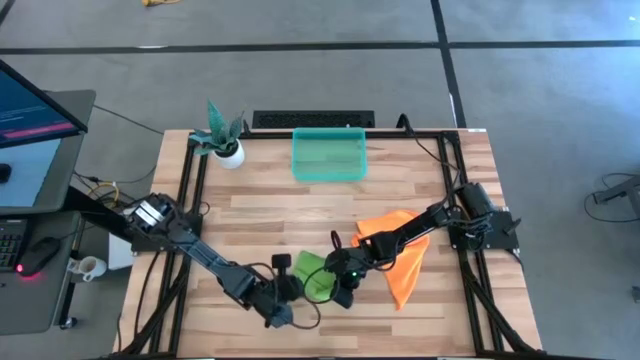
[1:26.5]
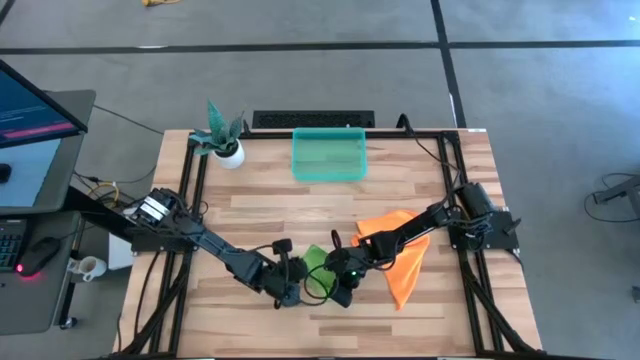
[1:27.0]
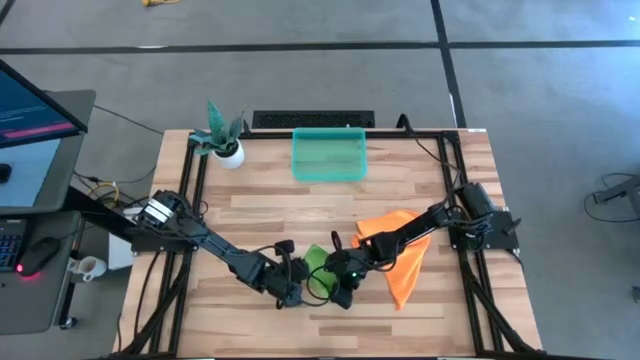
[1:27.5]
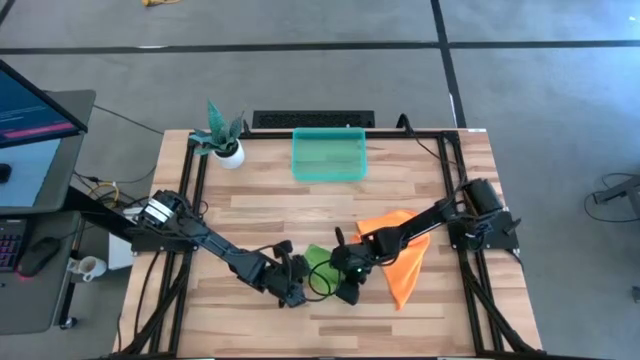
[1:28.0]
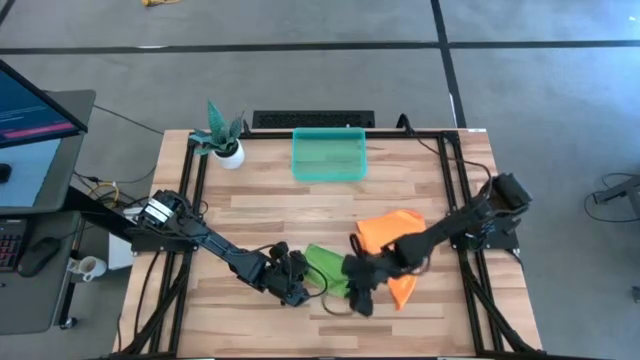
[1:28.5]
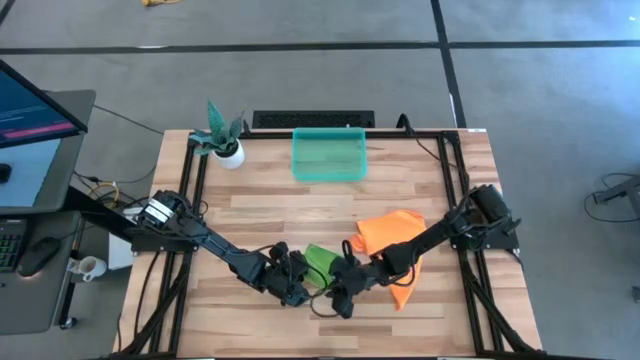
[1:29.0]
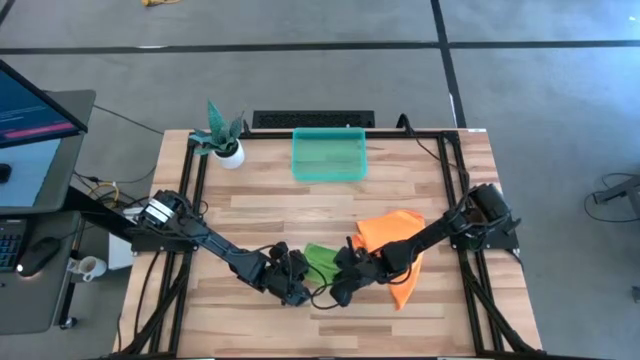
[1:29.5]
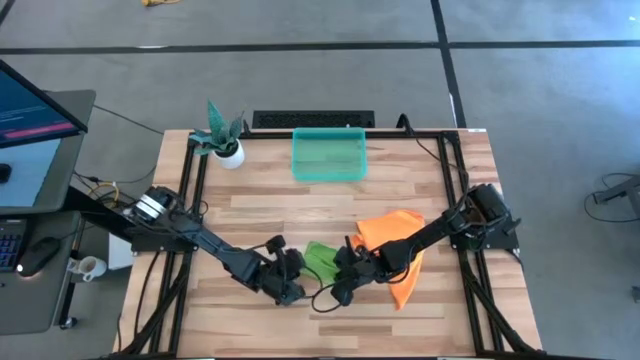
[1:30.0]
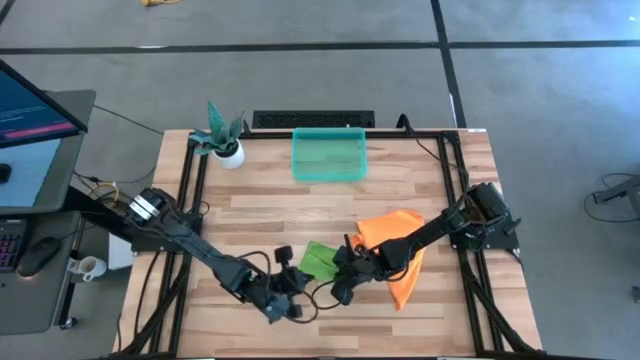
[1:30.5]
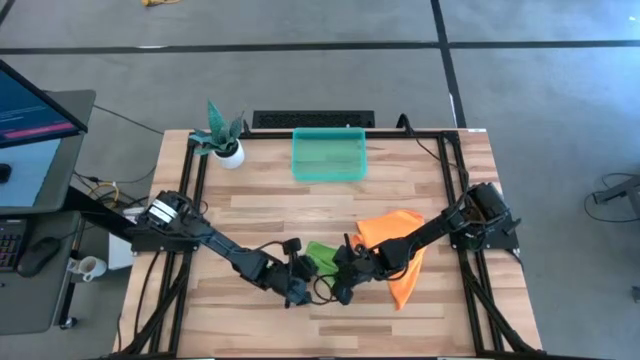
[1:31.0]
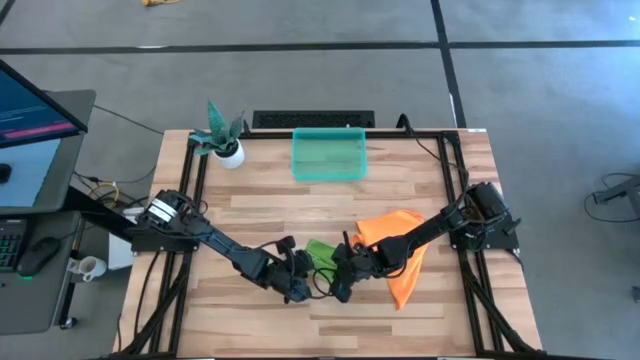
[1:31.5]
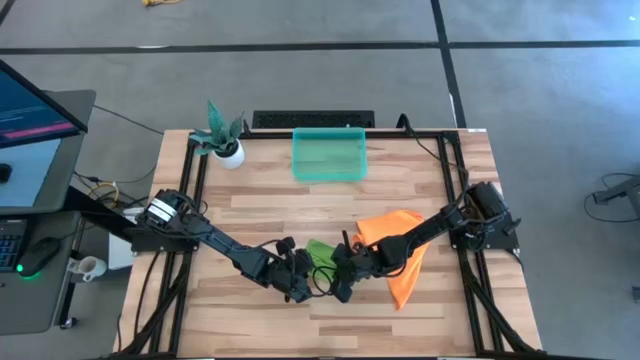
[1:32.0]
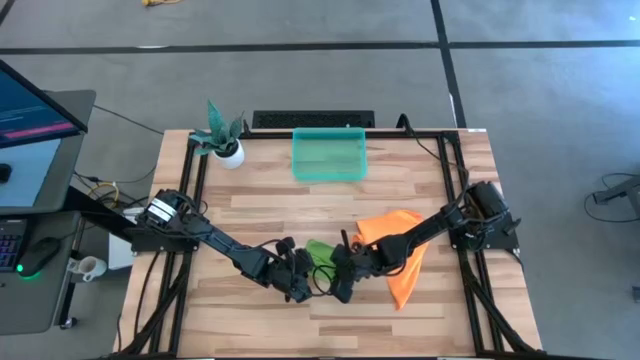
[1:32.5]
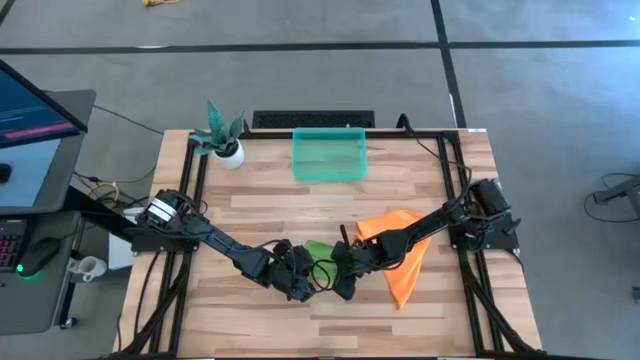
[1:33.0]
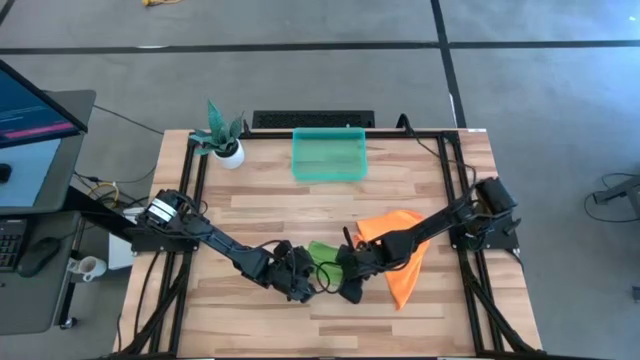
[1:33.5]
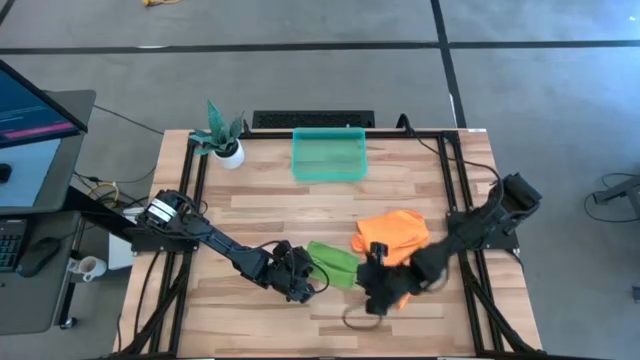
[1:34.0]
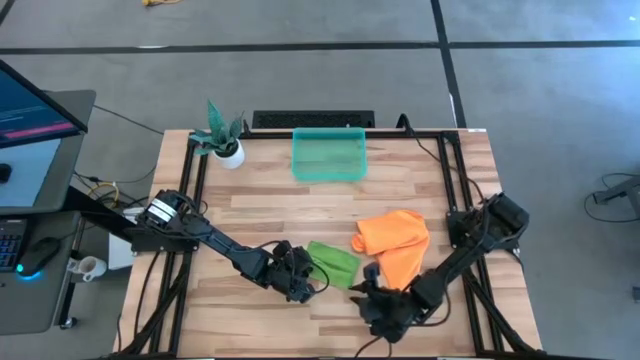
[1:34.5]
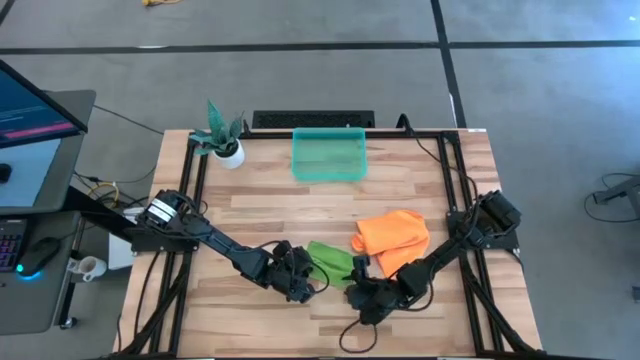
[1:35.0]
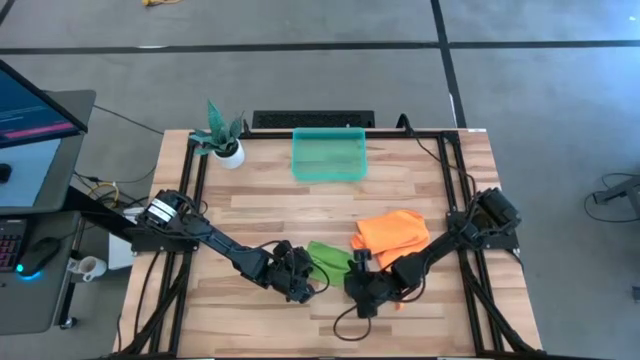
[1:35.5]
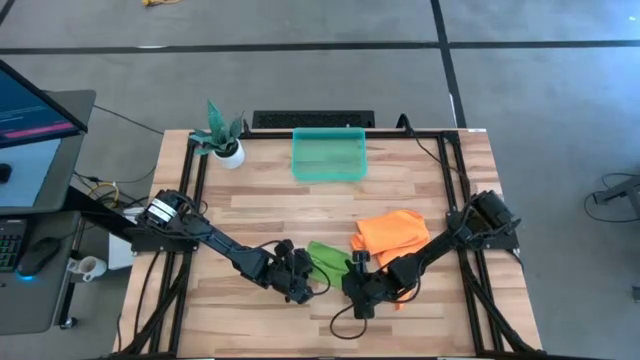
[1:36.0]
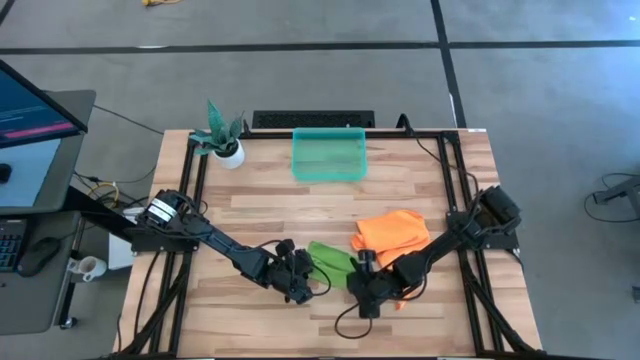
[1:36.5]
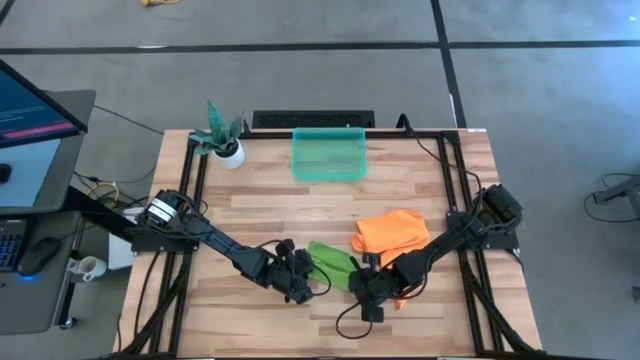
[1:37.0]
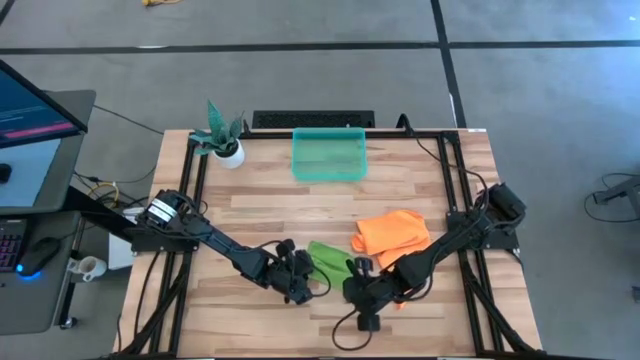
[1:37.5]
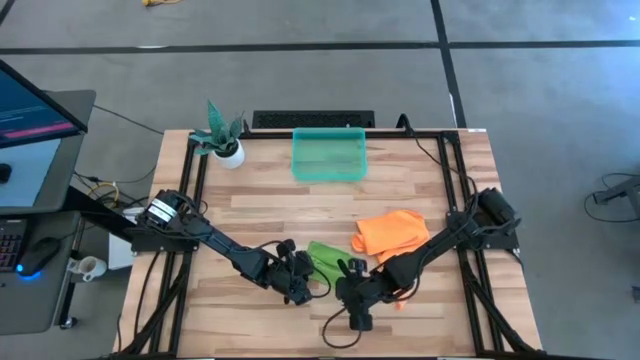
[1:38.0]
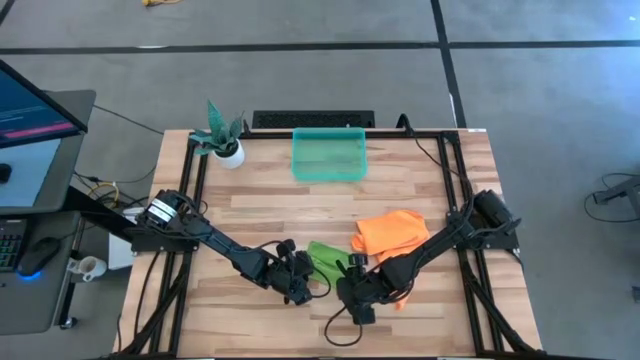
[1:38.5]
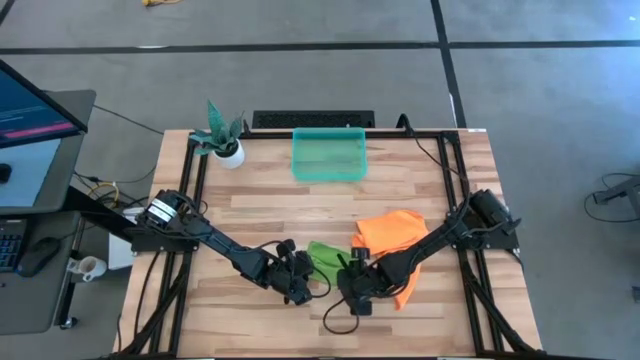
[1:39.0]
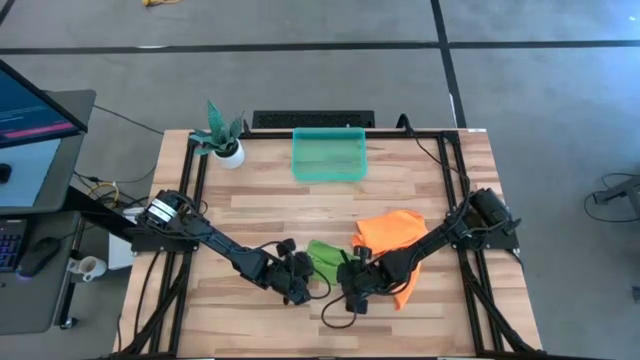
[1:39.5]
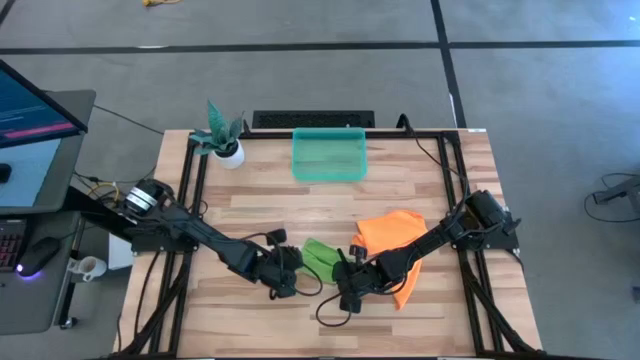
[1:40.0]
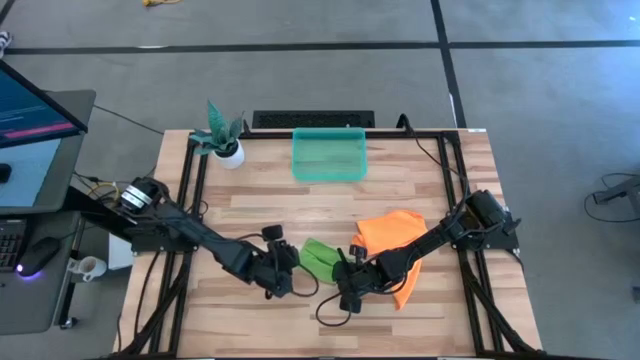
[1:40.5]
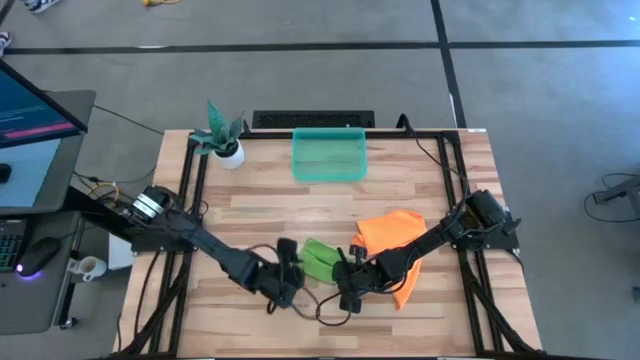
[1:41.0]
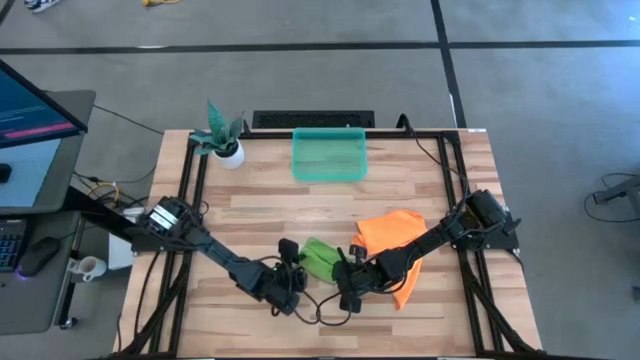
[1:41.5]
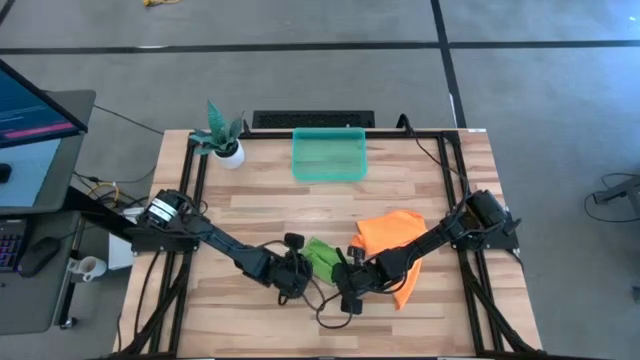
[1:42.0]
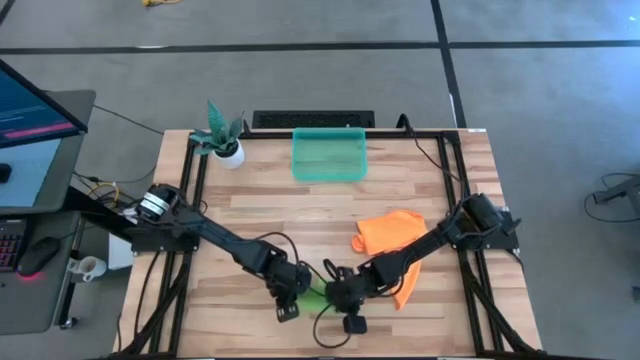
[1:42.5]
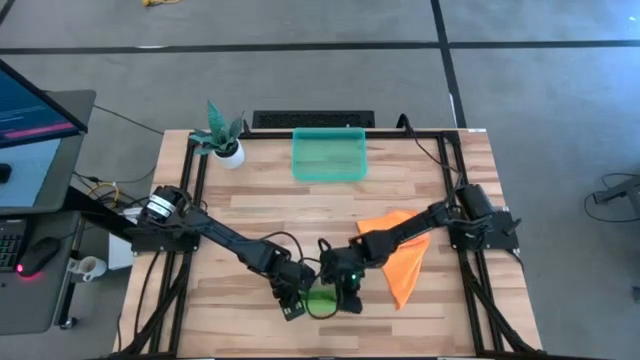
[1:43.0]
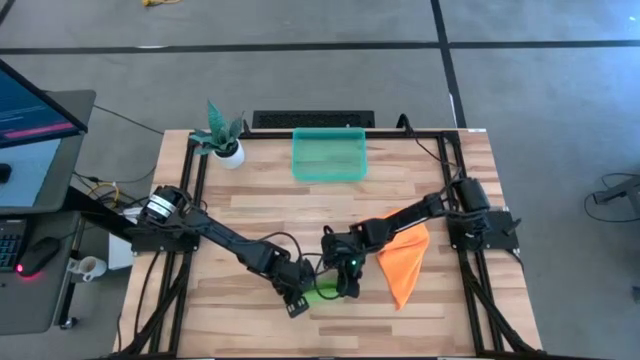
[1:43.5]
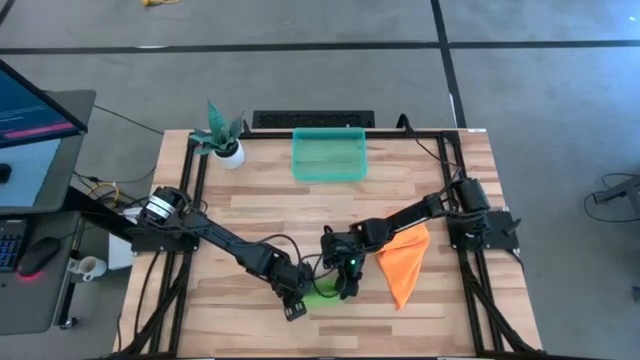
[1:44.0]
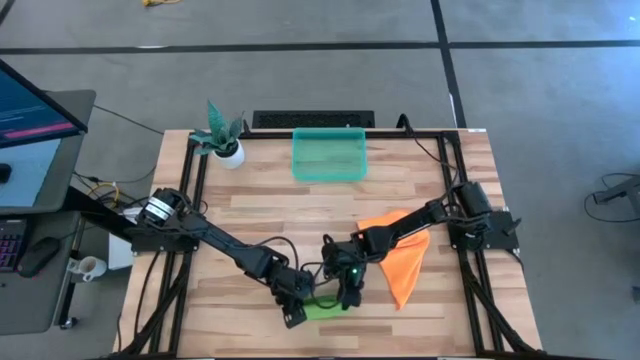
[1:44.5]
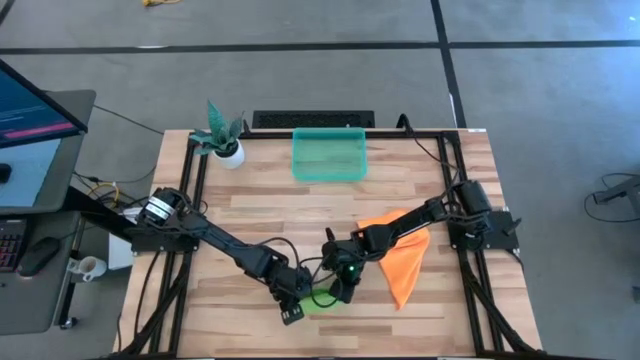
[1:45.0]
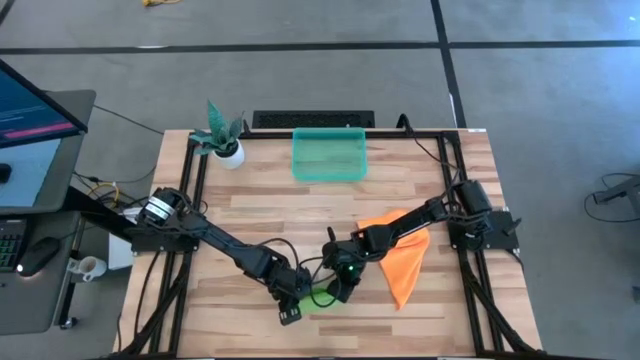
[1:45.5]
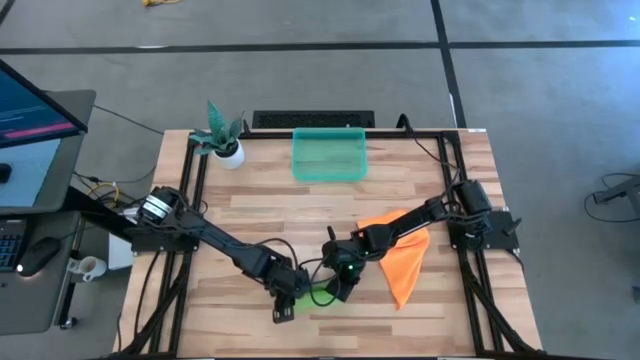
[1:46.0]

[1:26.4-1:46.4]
Task: Roll towel into tight, uniform cylinder
Roll the green microfiber towel

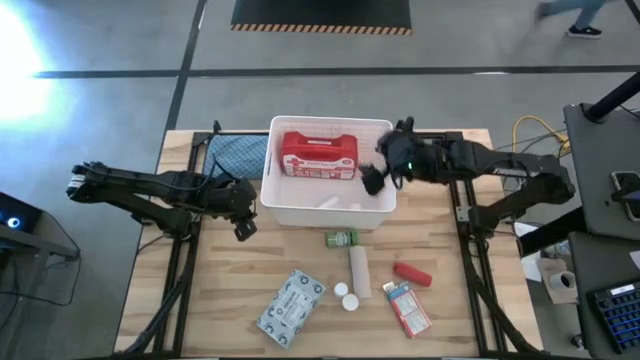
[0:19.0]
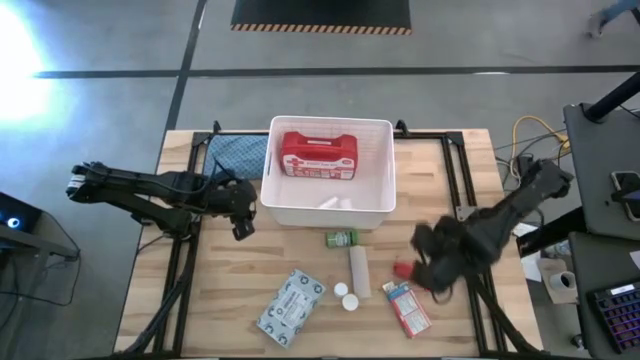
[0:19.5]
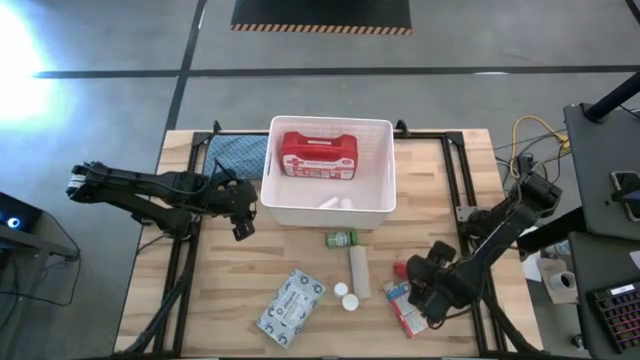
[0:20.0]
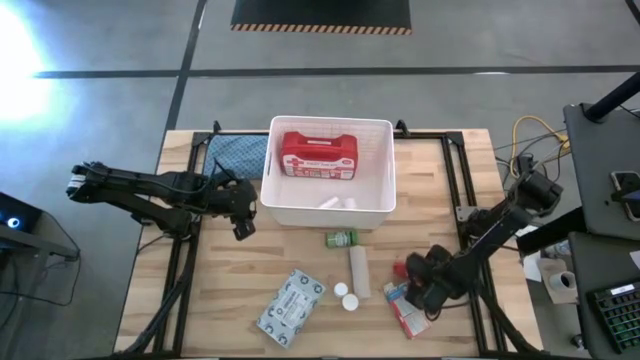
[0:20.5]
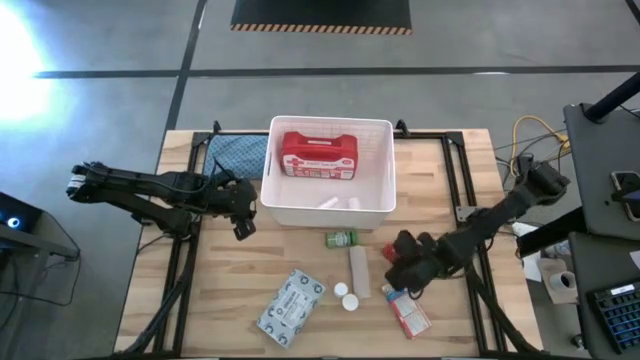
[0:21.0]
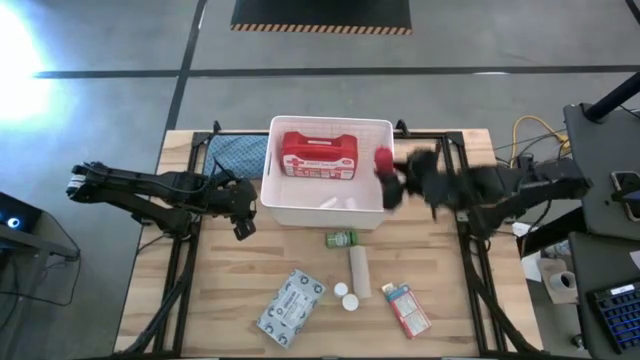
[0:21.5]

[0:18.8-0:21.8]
Task: Pick & place medical supplies in basket/bin
Put the red bandage into the bin
